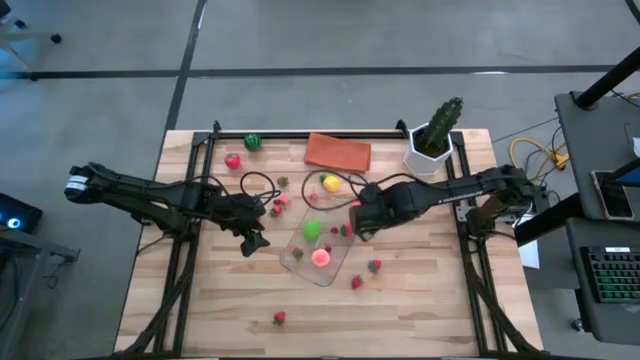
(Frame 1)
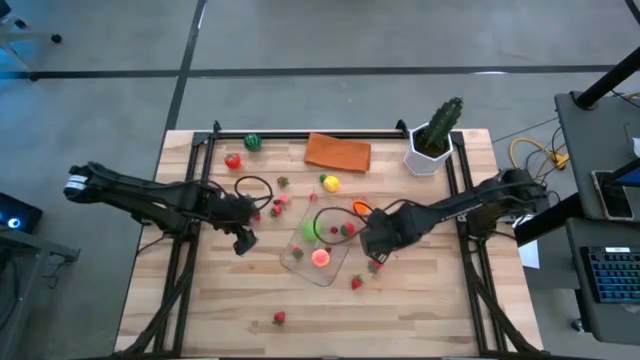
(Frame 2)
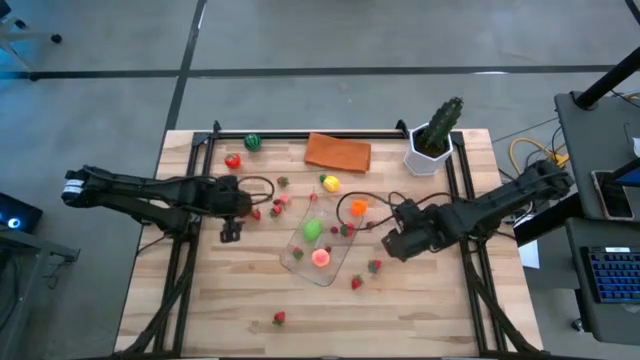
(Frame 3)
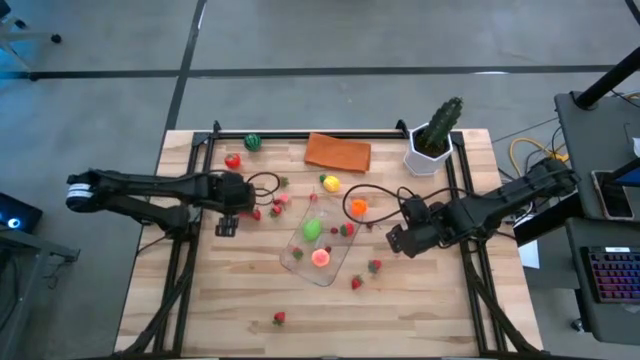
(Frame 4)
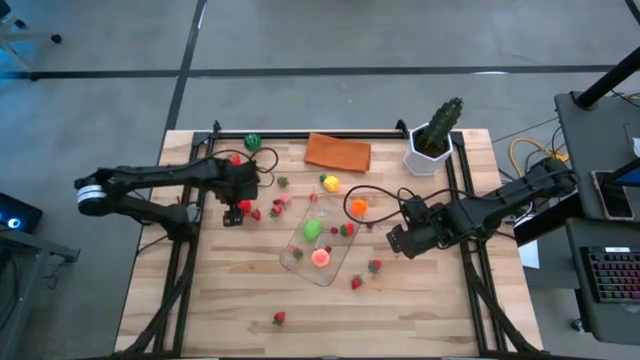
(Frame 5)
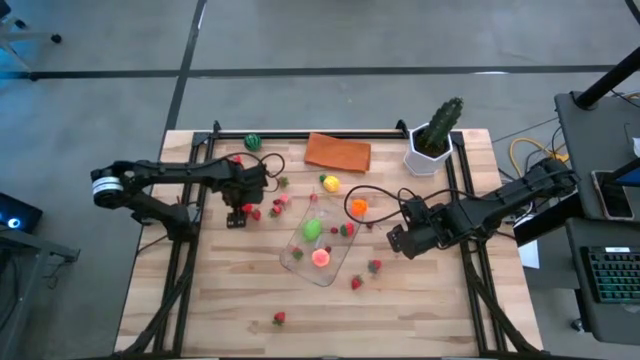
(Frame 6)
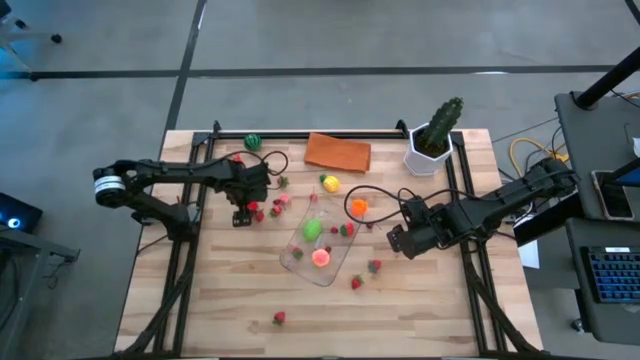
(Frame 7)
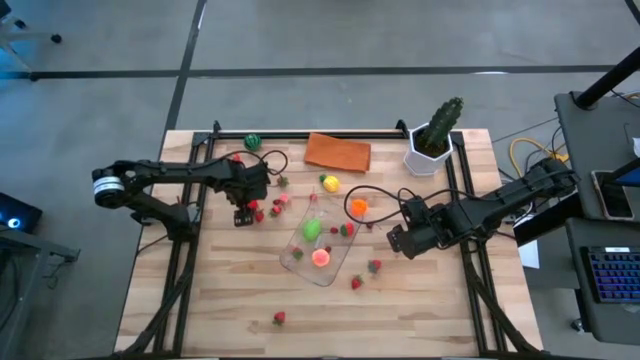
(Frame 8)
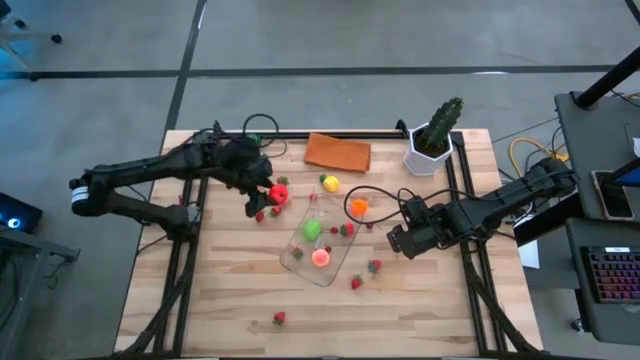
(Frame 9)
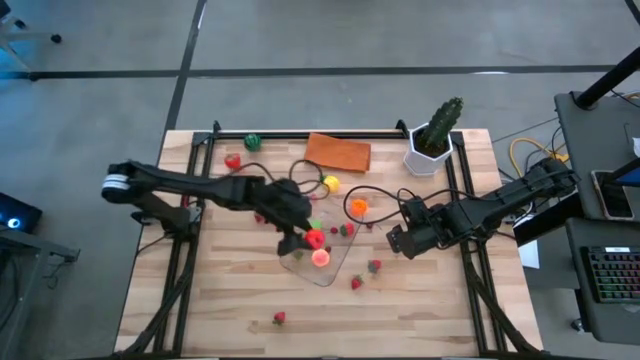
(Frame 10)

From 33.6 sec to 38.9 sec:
Task: Pick and placing Produce into tupperware
Put the apple into the transparent bin

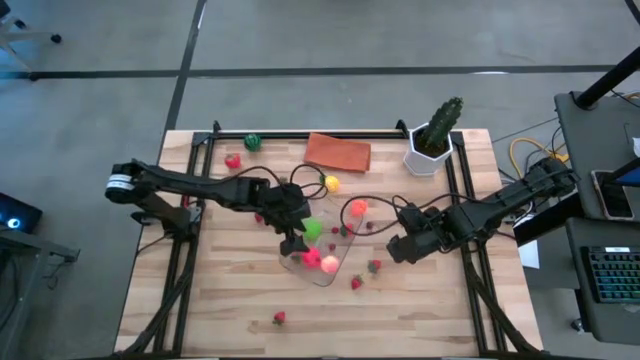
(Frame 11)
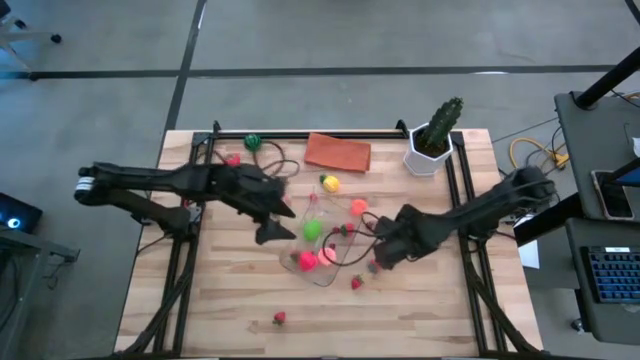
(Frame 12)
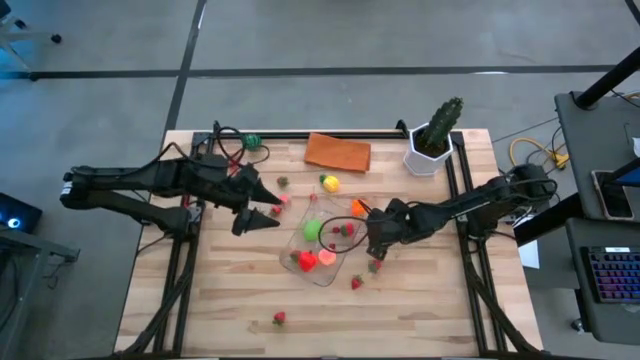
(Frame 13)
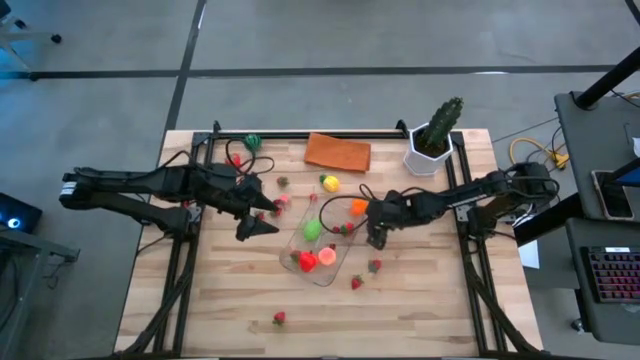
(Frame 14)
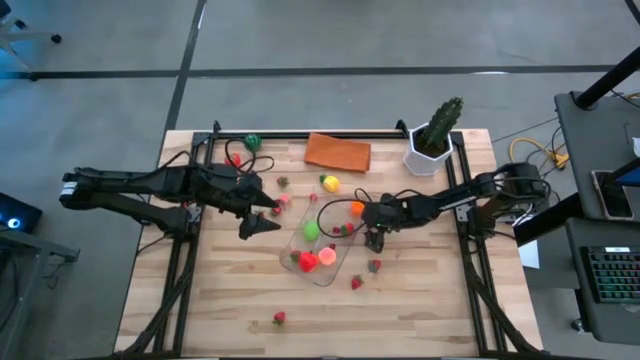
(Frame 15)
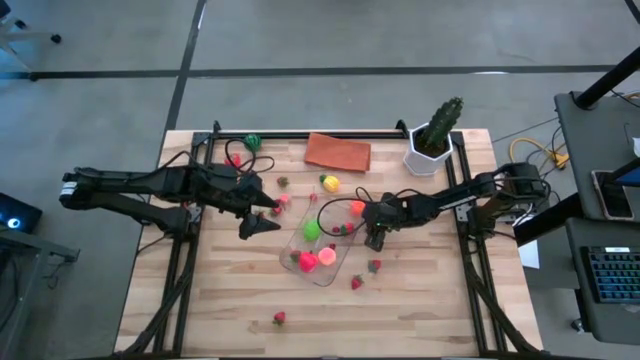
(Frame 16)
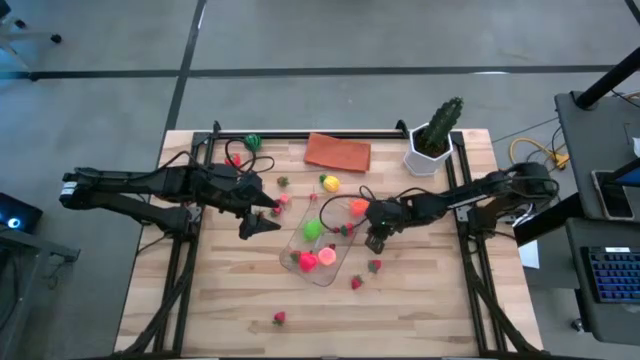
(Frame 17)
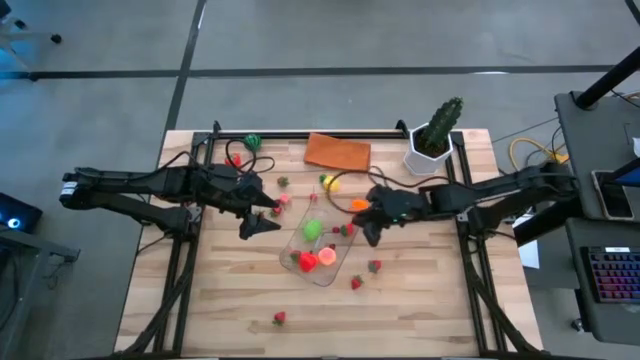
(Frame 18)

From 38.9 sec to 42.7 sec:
Put the right cherry into the transparent bin

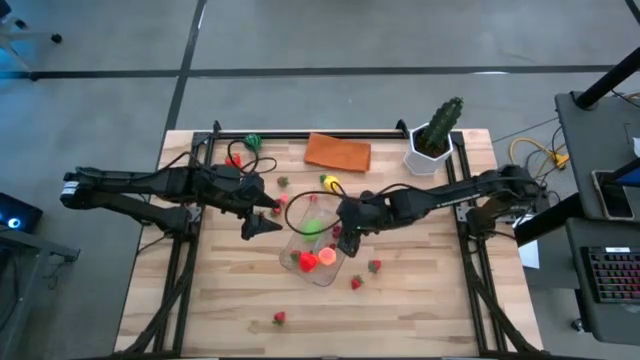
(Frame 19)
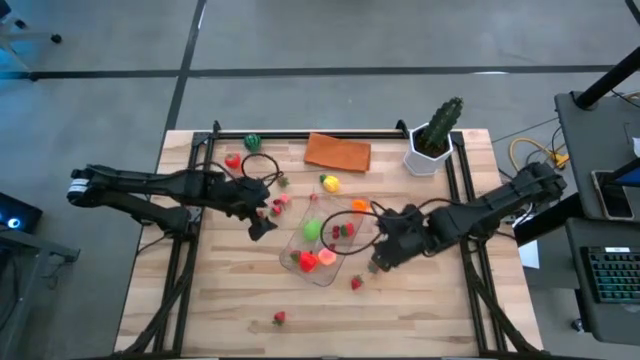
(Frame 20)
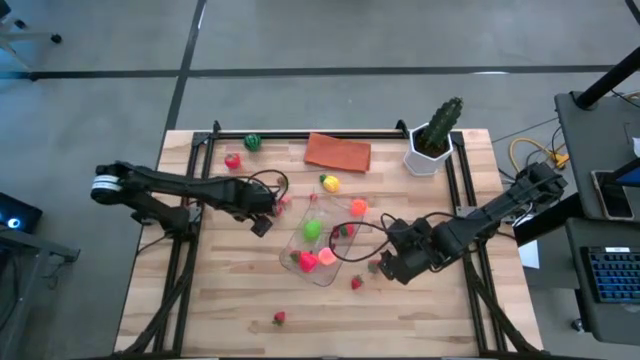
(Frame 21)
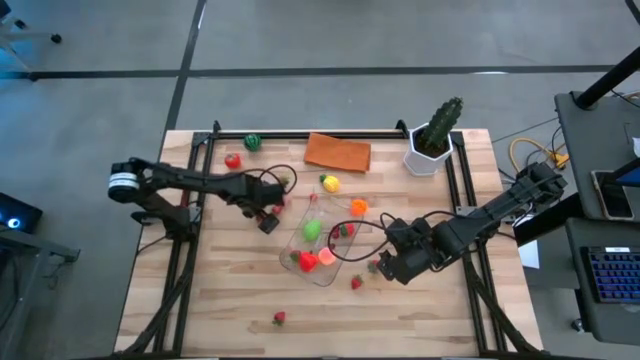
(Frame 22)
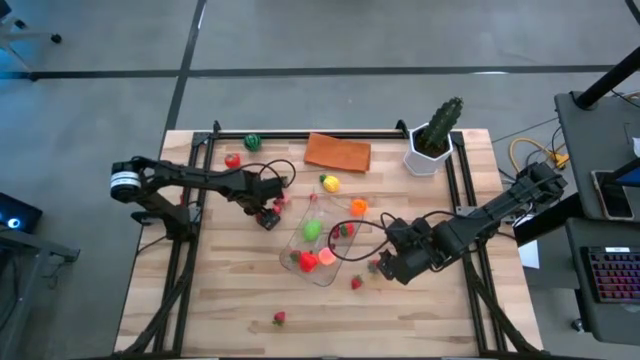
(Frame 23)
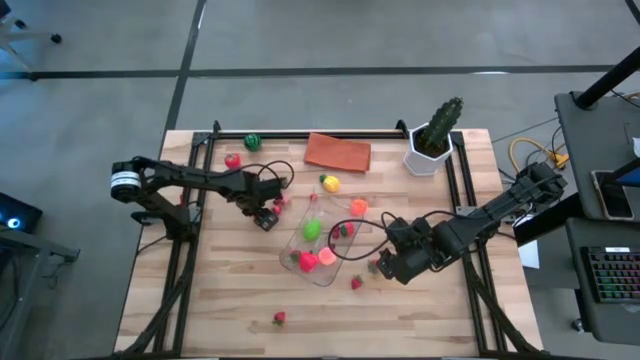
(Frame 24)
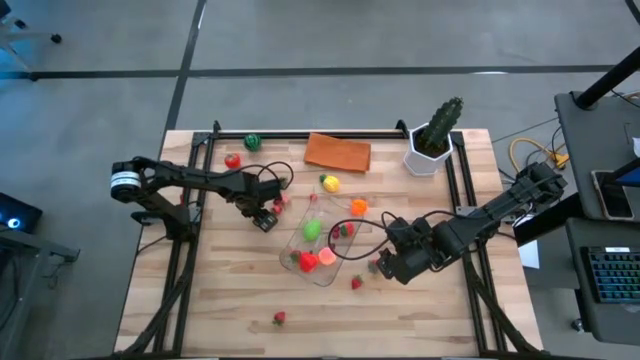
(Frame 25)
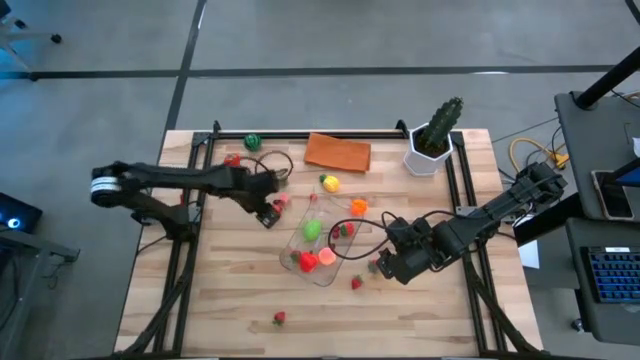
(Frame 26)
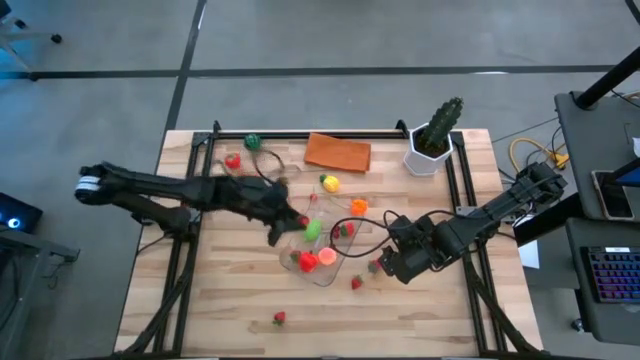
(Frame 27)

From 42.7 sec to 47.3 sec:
Put the strawberry into the transparent bin

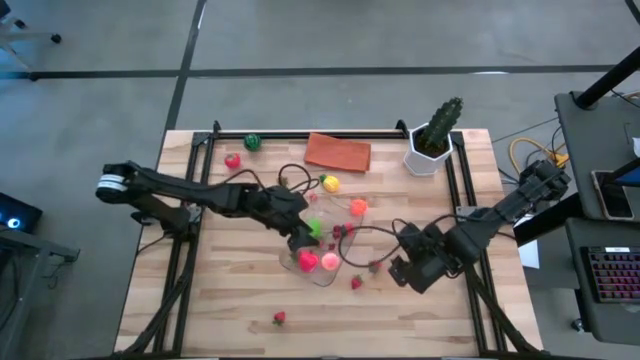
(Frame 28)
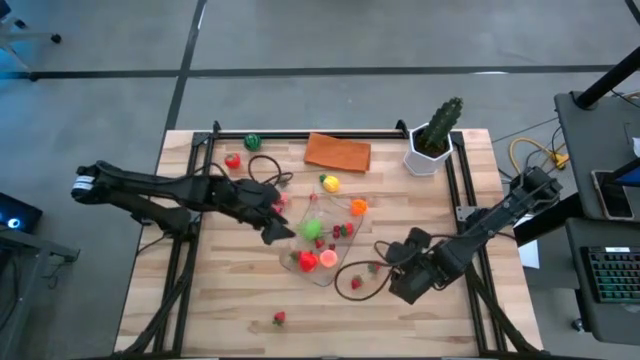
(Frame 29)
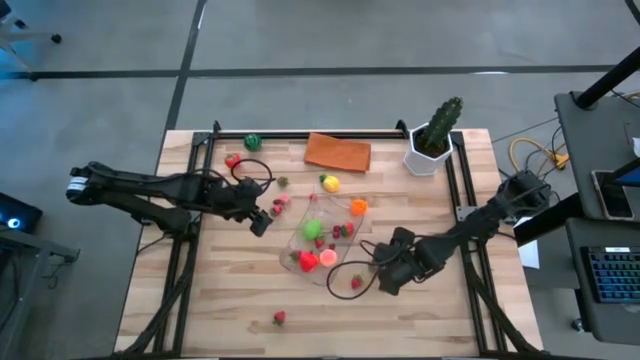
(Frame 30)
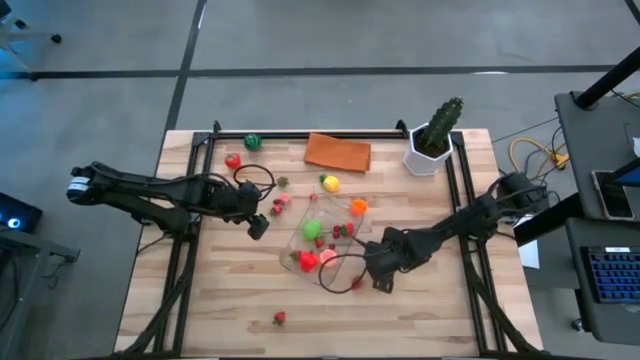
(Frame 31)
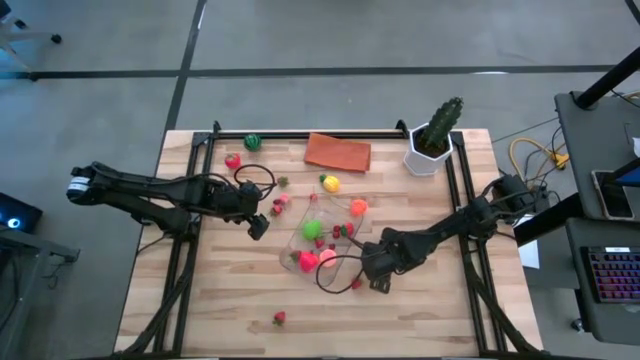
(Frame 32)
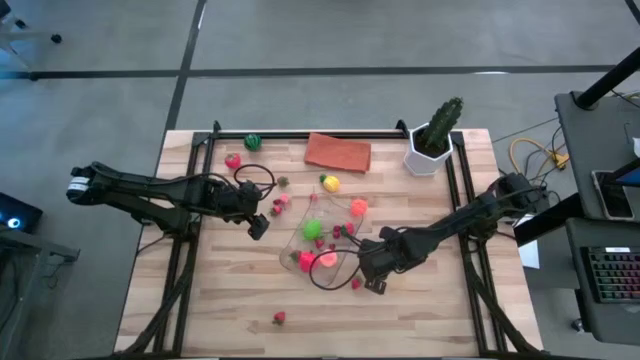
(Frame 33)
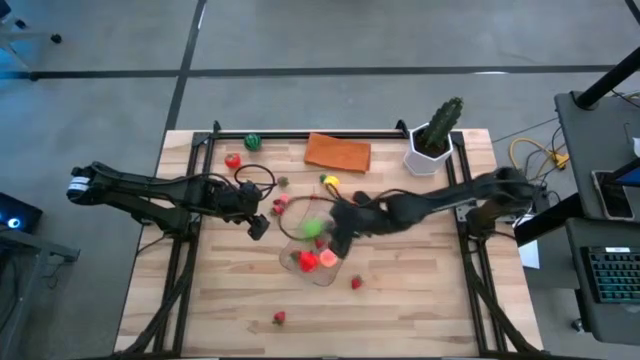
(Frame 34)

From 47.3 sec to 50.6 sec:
Put the strawberry into the transparent bin

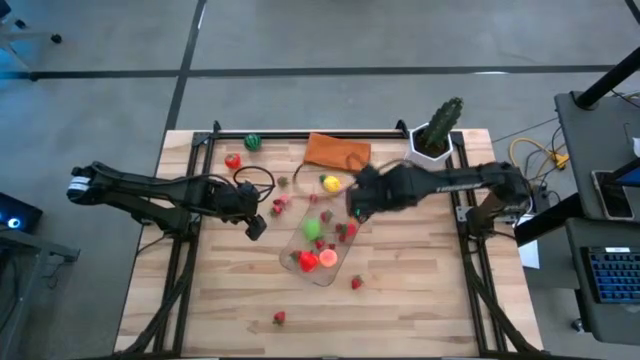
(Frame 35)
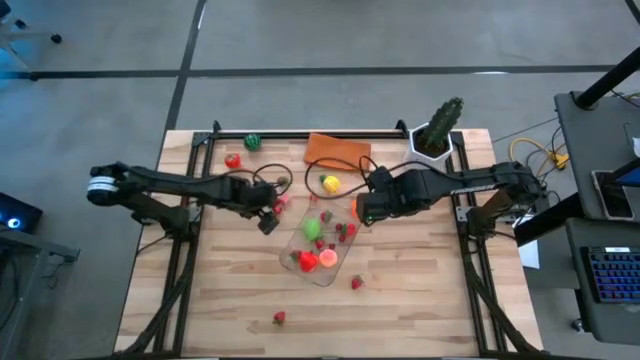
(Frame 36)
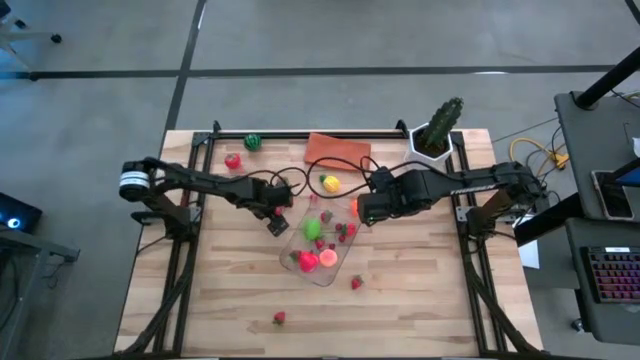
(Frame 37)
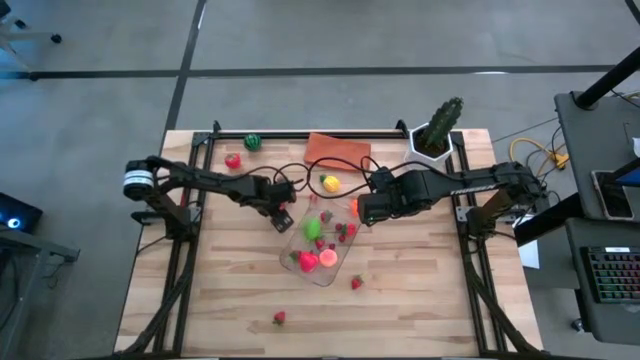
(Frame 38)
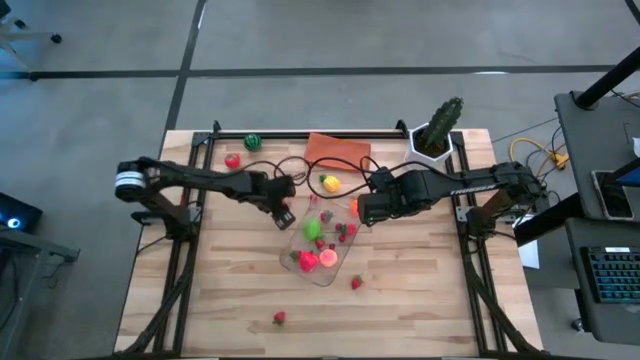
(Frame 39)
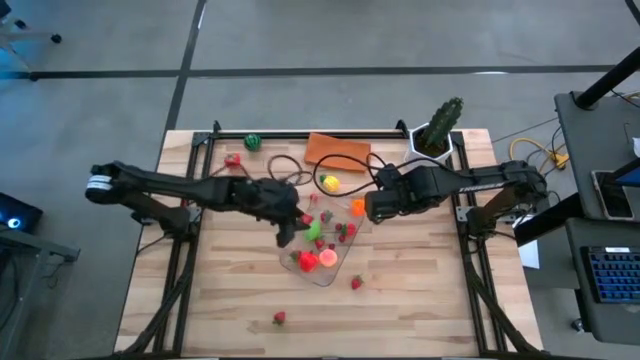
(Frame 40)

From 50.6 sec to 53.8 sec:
Put the strawberry into the transparent bin

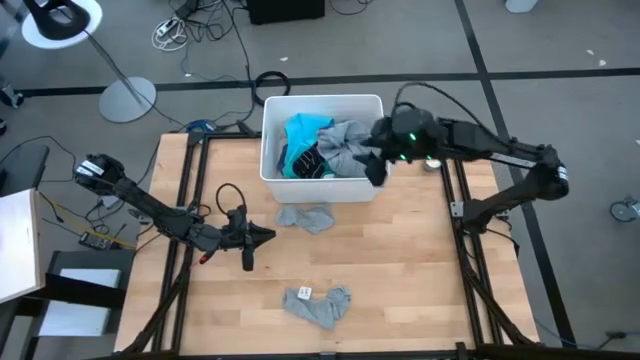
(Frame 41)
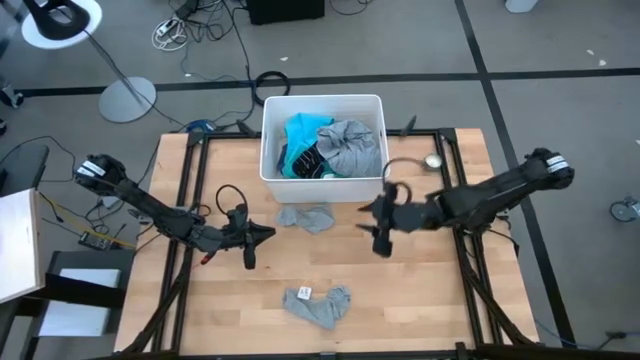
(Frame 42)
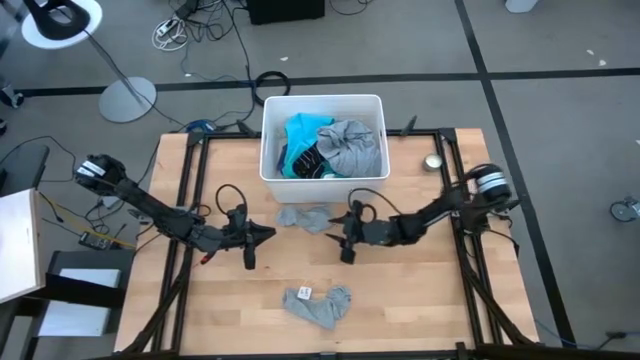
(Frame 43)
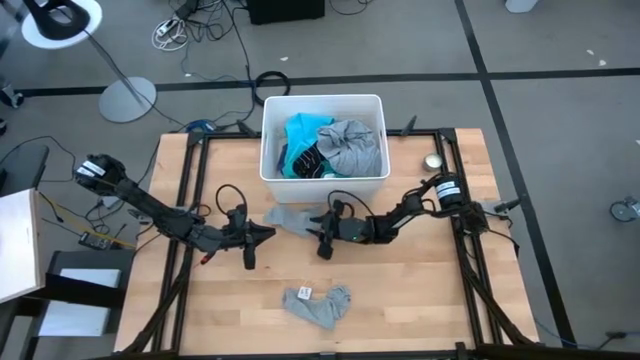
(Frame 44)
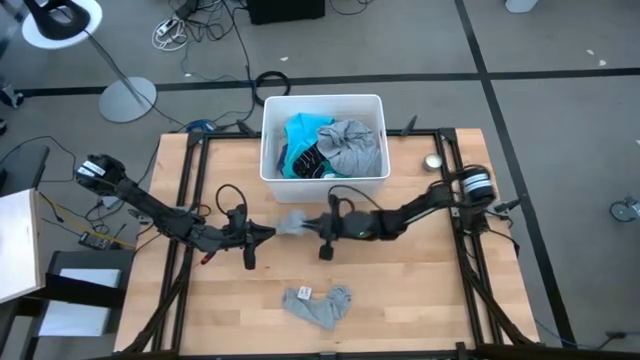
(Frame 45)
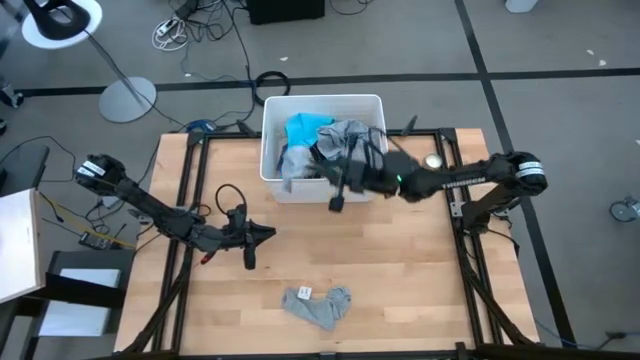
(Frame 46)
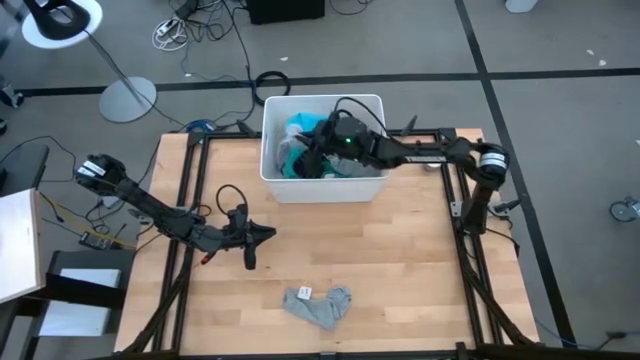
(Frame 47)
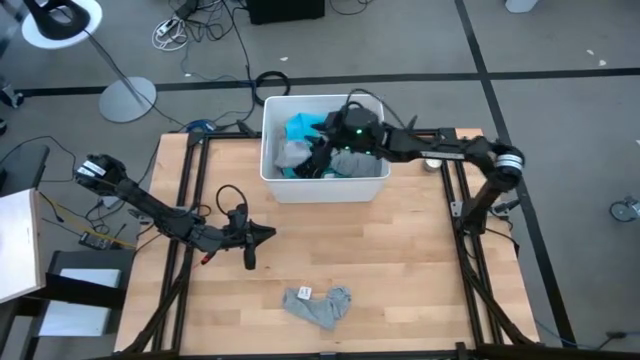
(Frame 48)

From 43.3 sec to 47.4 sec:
Task: Sort clothes
Put the top gray sock into the white bin
